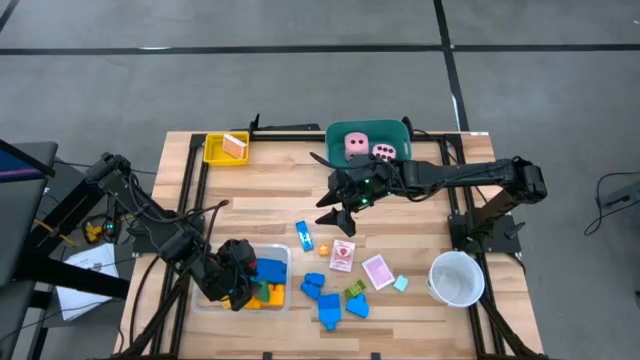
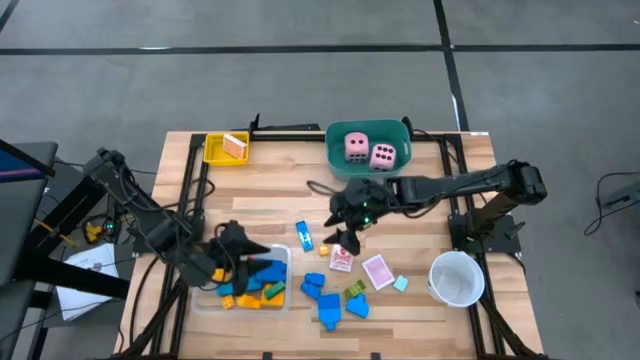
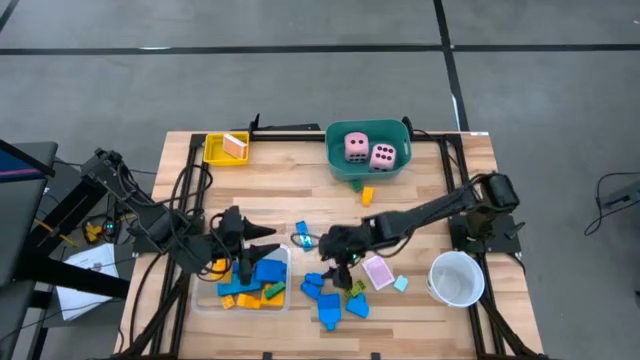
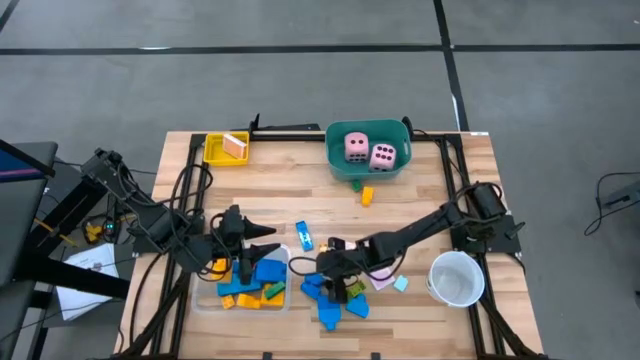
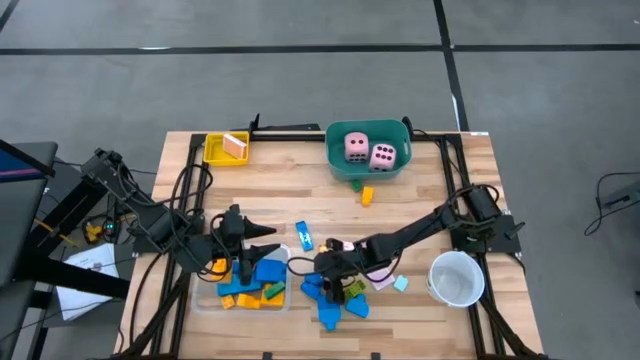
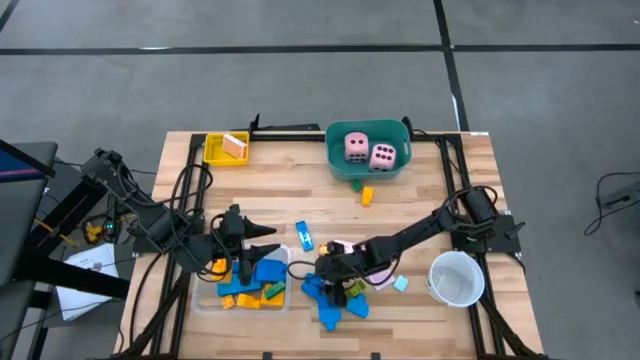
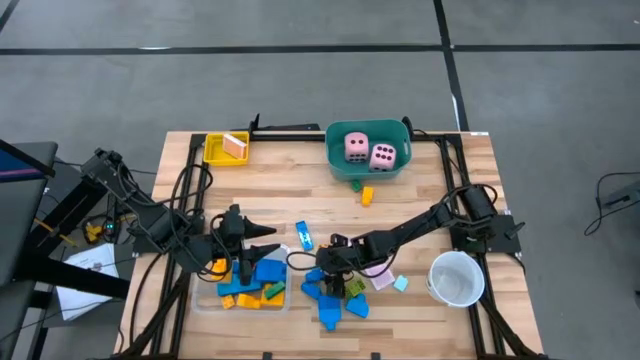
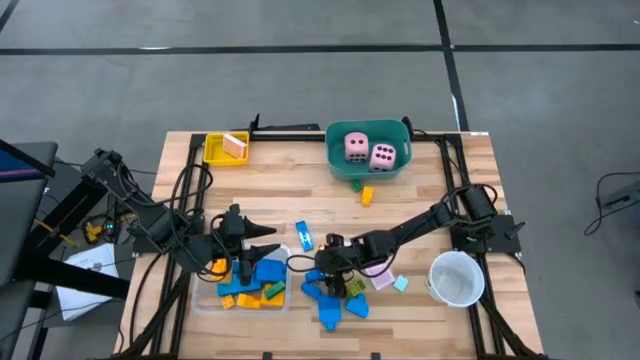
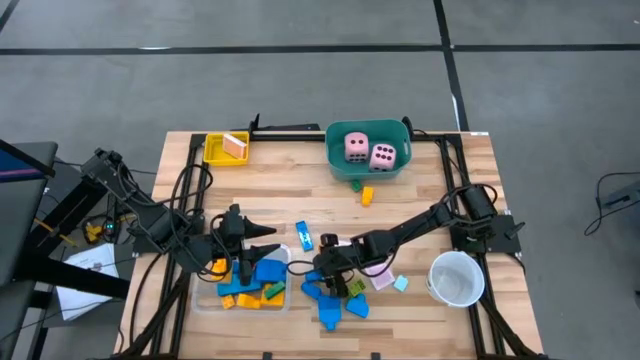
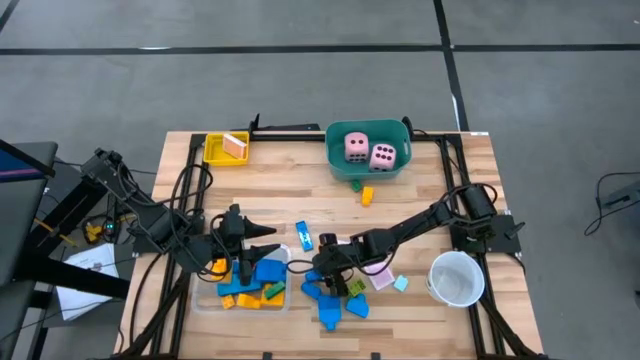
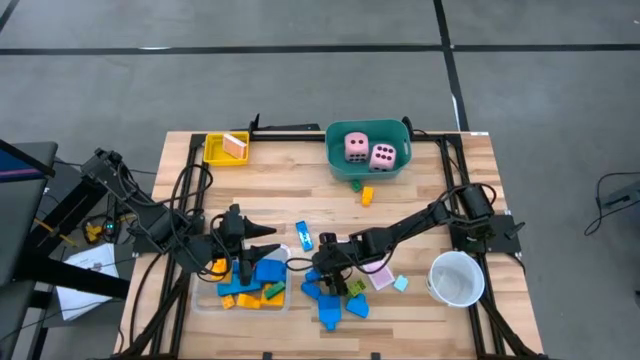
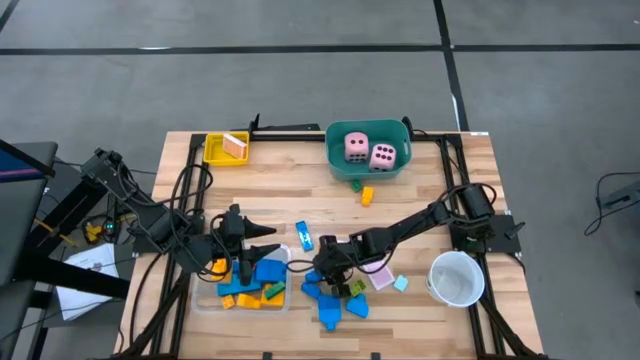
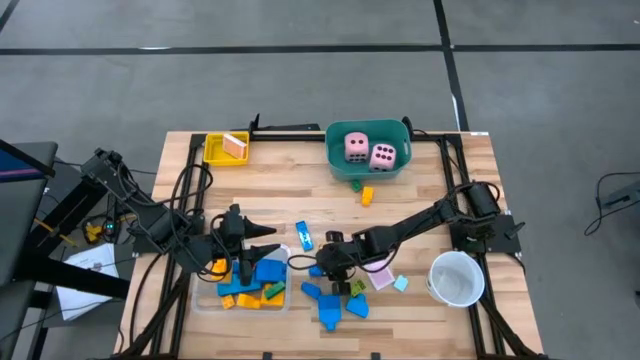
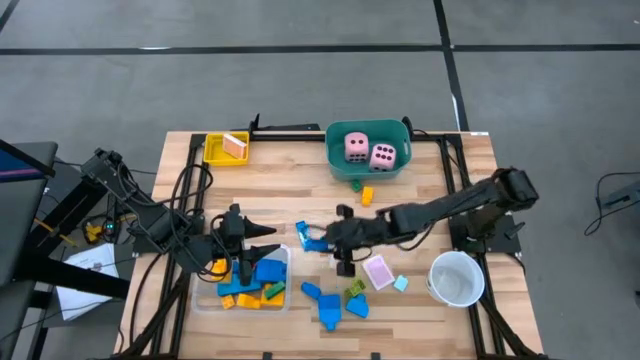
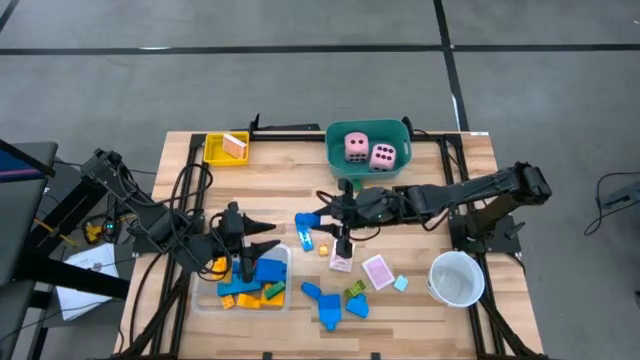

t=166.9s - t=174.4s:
Task: Pick & Place Toys
Put the blue game piece into the transparent bin

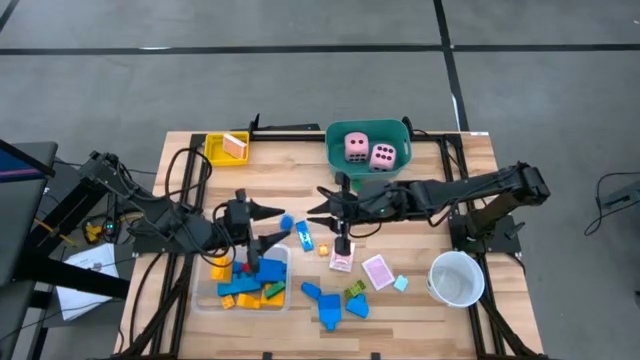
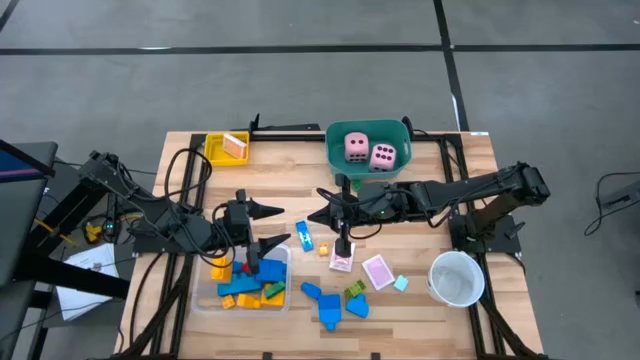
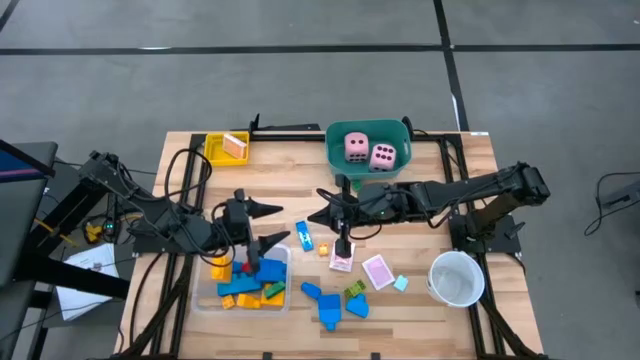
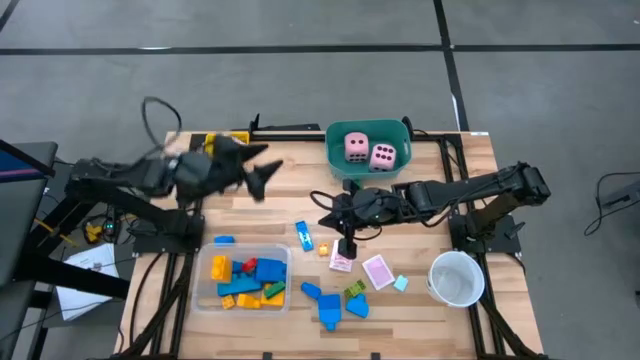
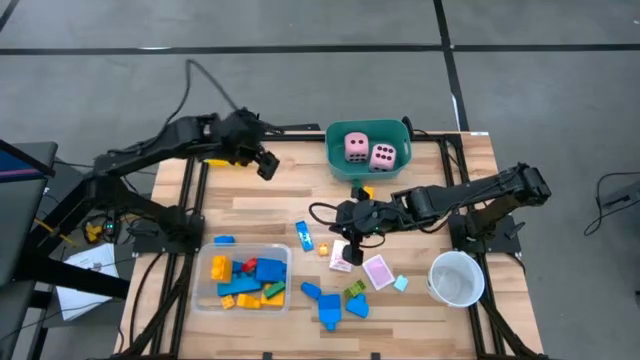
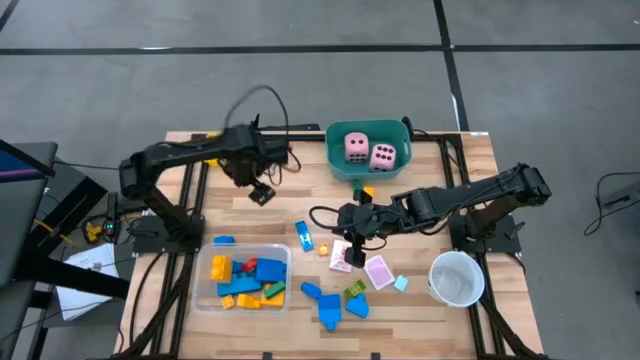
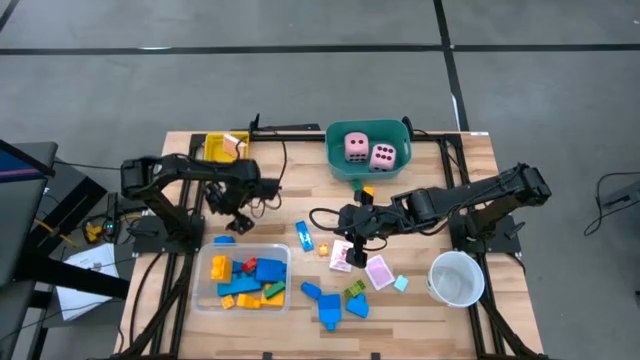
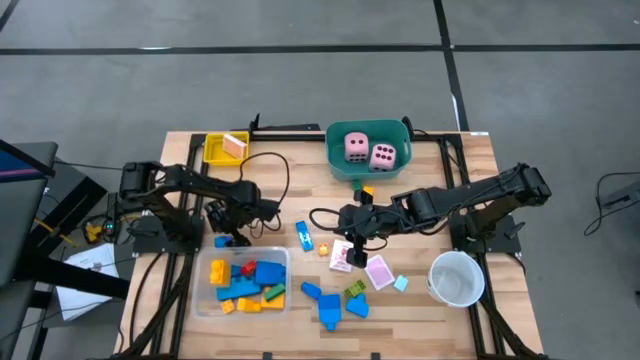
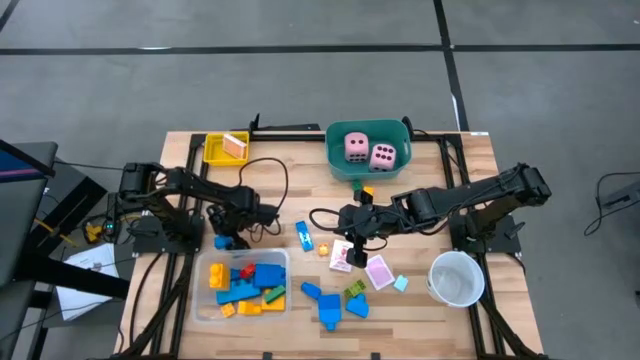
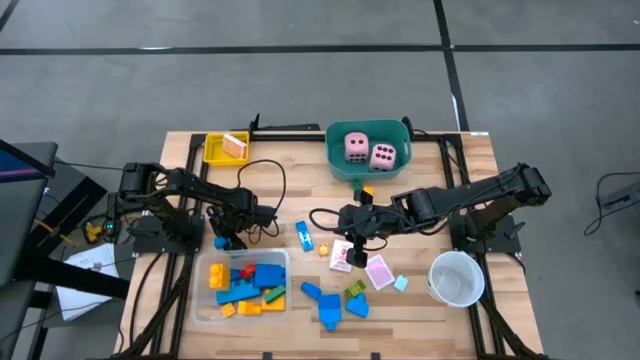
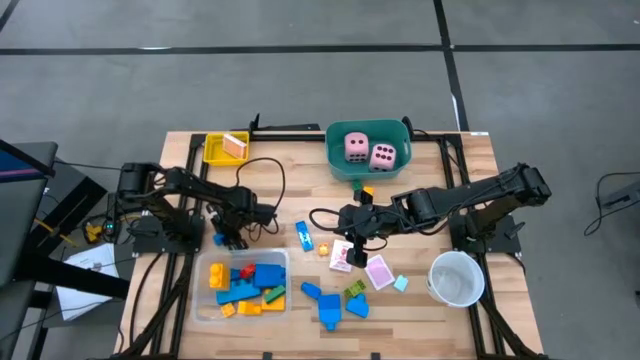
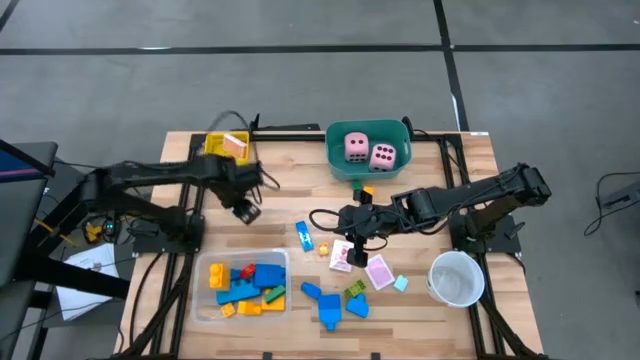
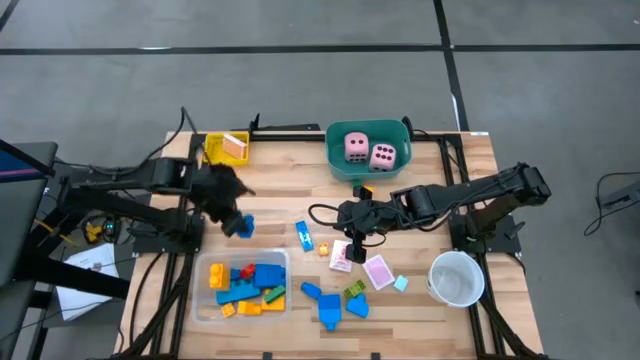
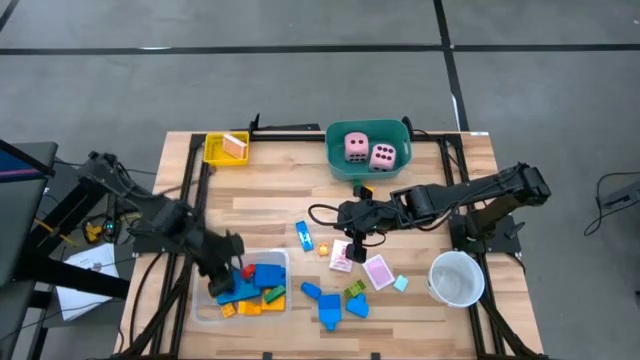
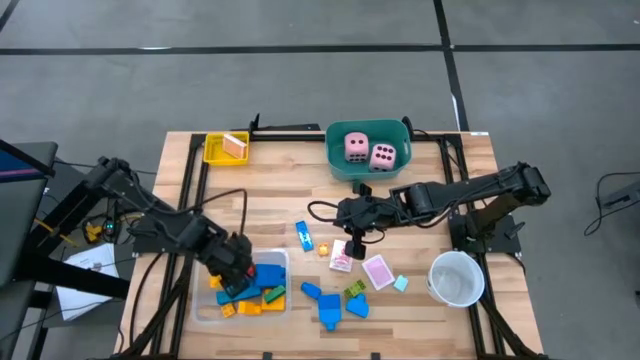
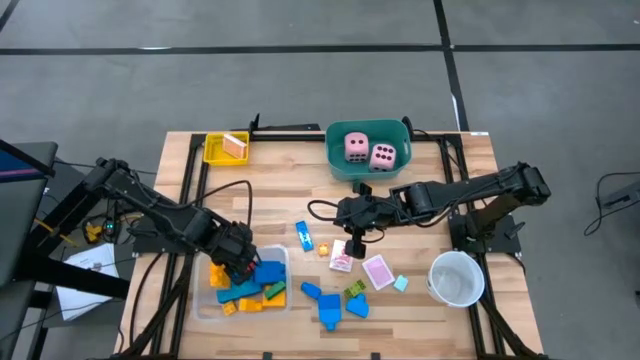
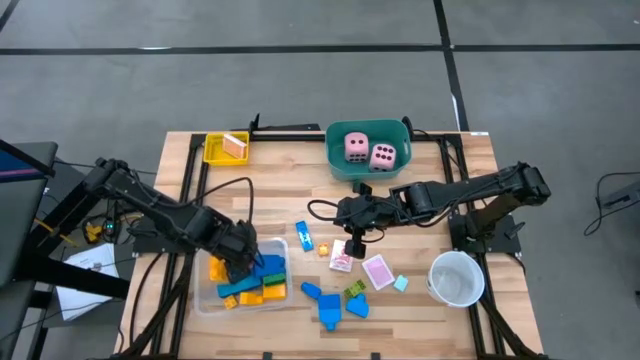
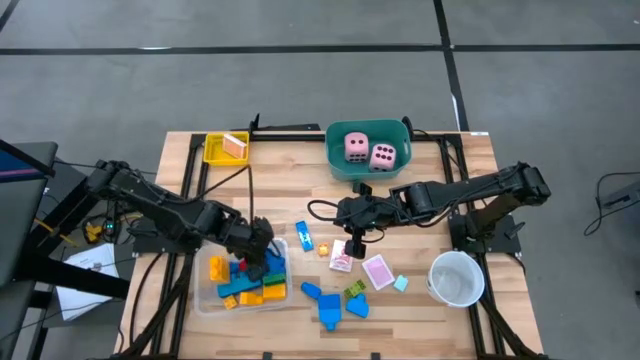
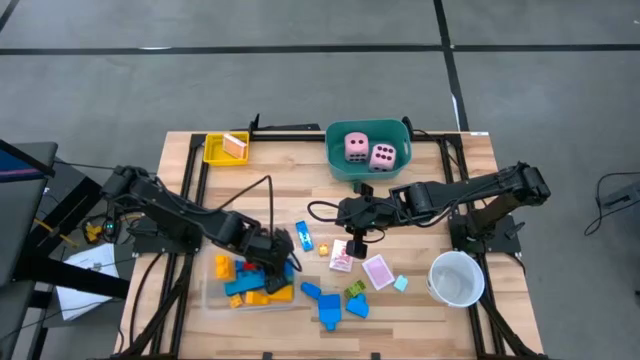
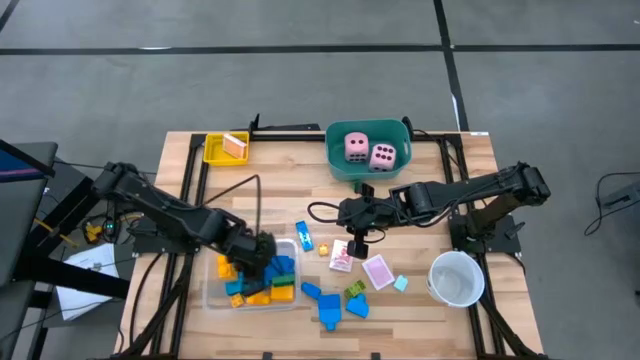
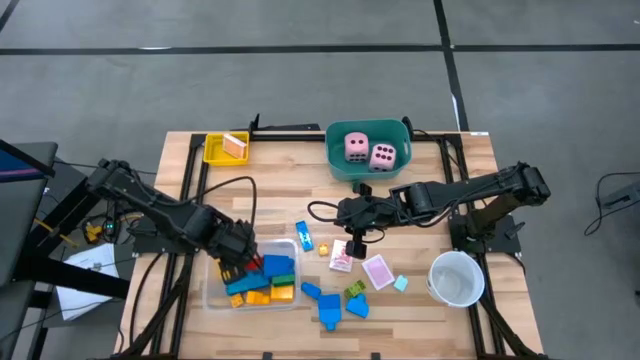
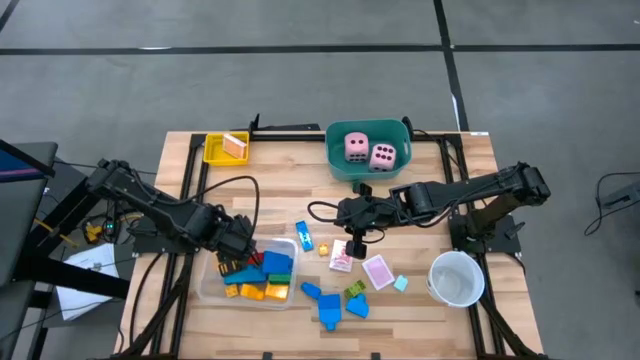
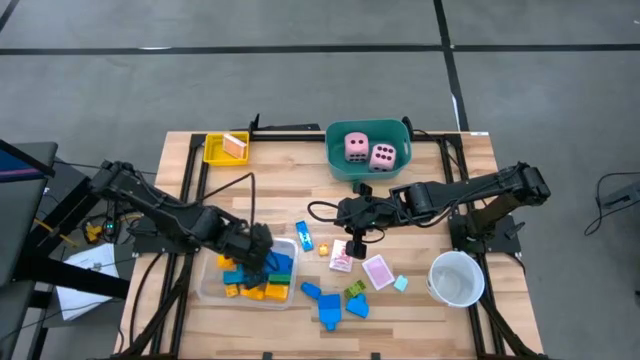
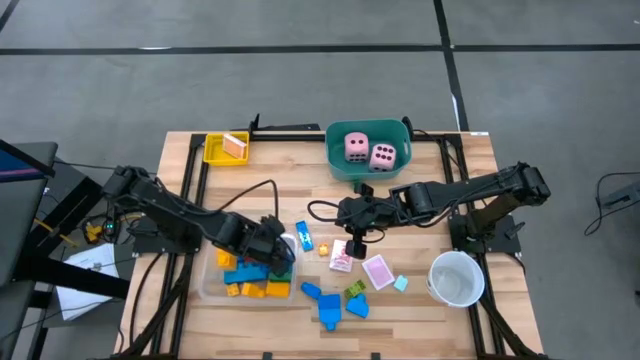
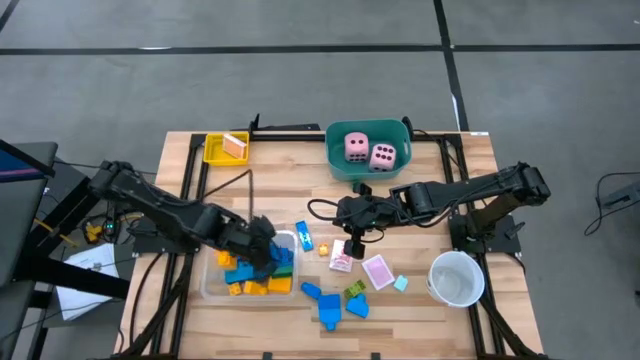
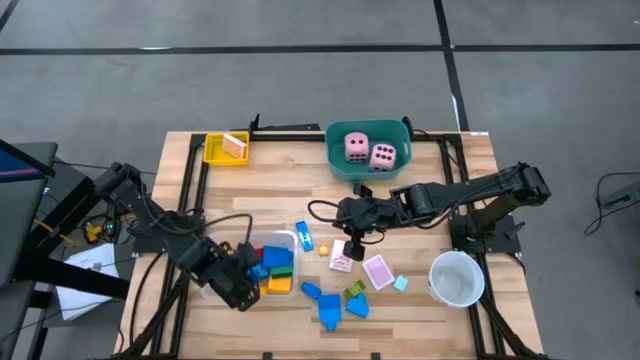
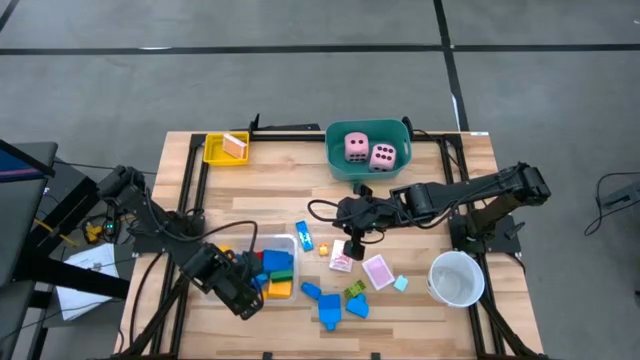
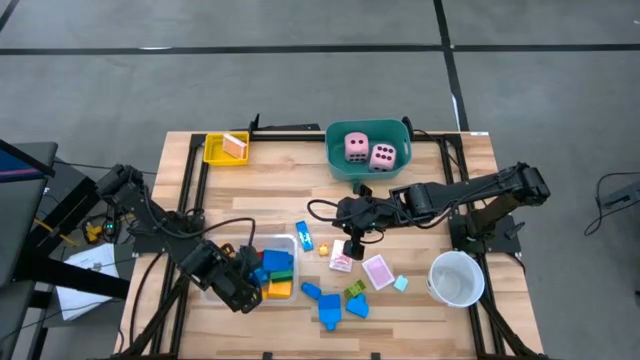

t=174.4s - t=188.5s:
Put the blue game piece into the transparent bin
